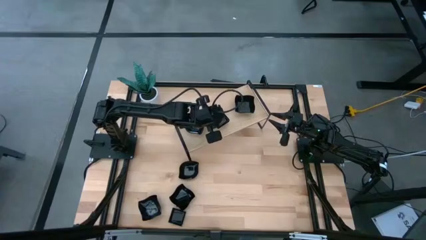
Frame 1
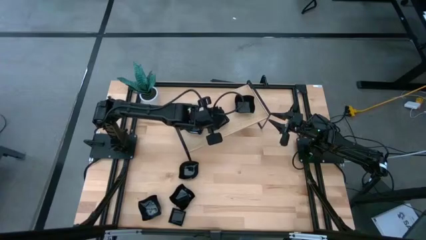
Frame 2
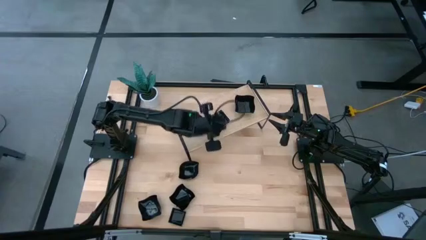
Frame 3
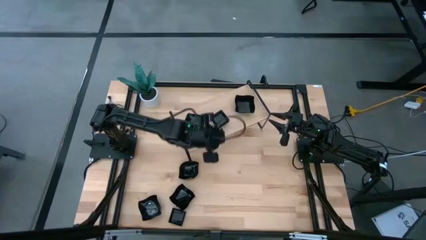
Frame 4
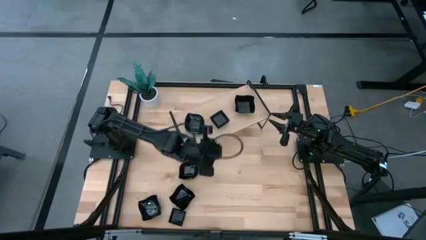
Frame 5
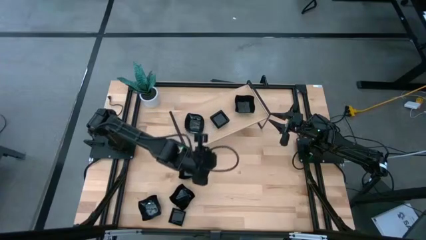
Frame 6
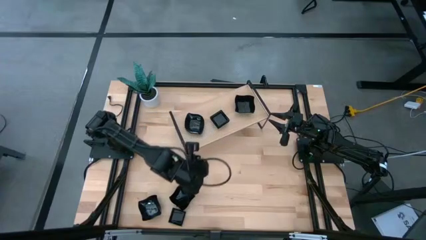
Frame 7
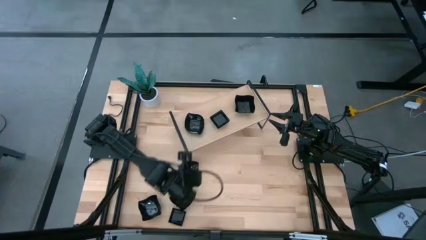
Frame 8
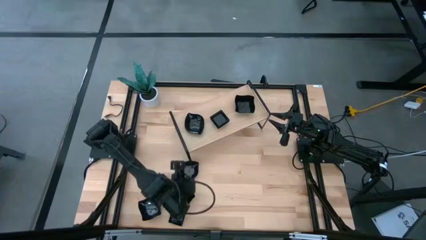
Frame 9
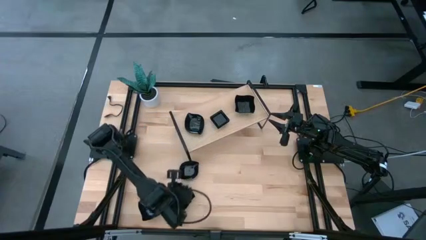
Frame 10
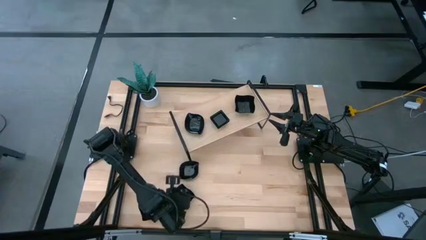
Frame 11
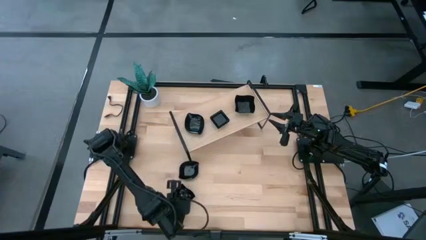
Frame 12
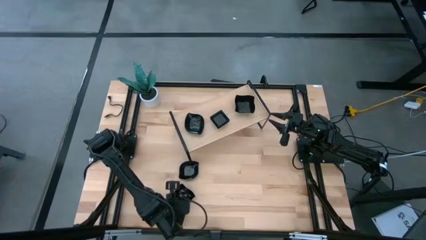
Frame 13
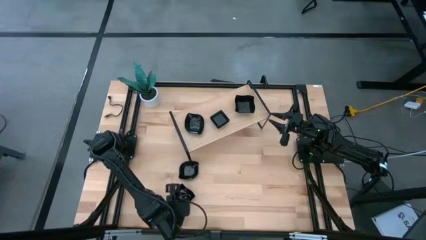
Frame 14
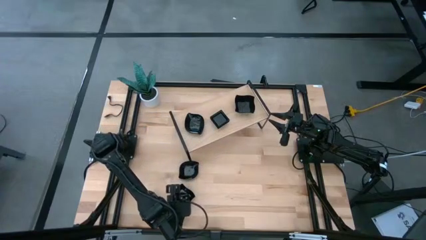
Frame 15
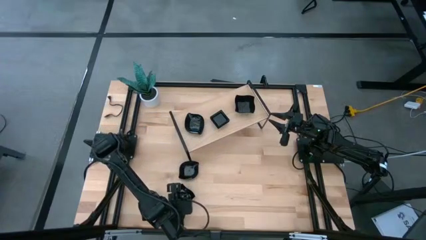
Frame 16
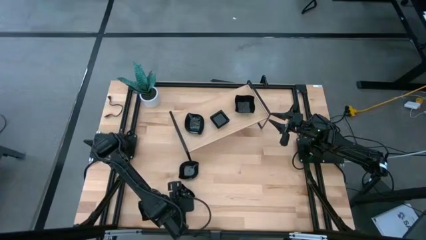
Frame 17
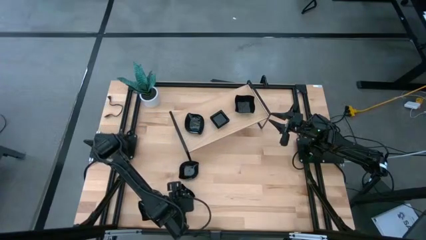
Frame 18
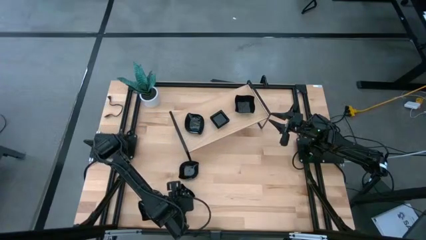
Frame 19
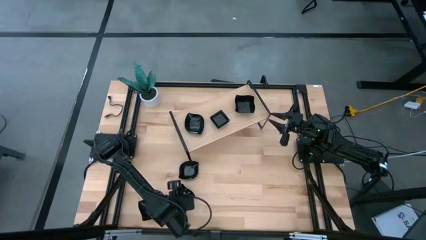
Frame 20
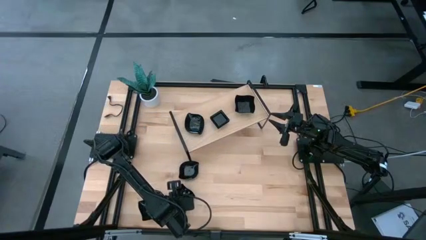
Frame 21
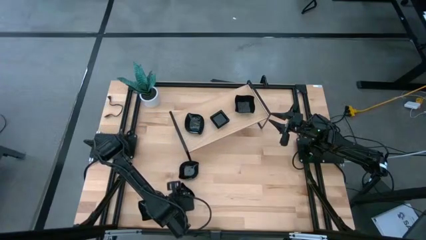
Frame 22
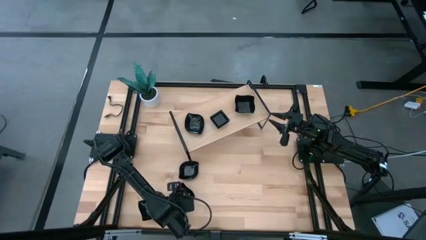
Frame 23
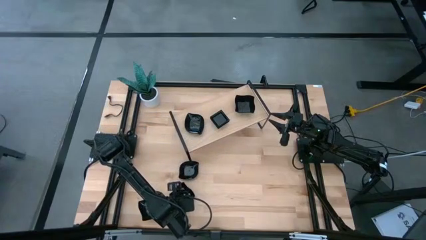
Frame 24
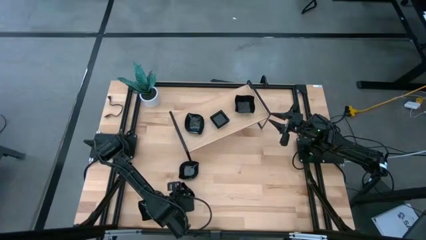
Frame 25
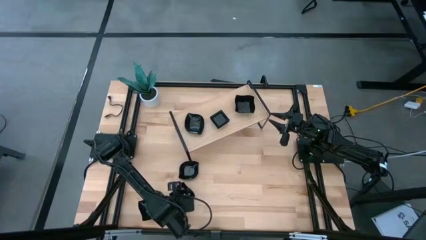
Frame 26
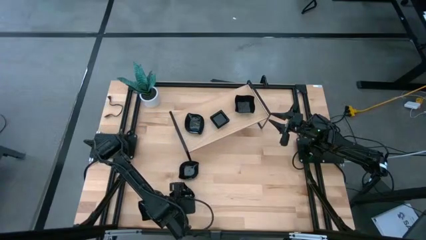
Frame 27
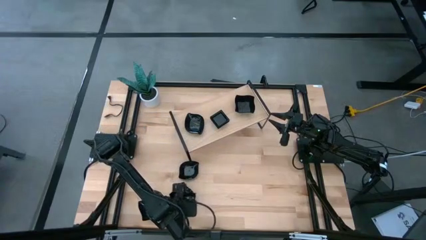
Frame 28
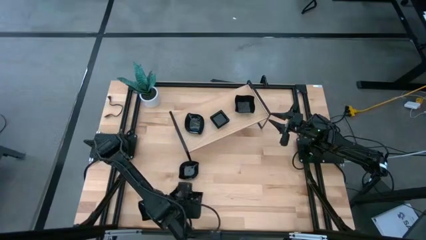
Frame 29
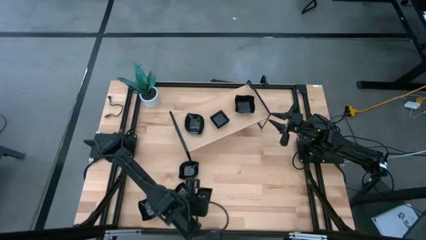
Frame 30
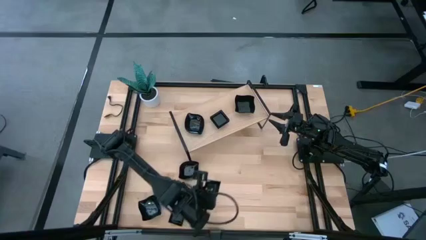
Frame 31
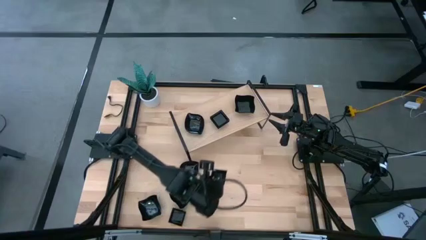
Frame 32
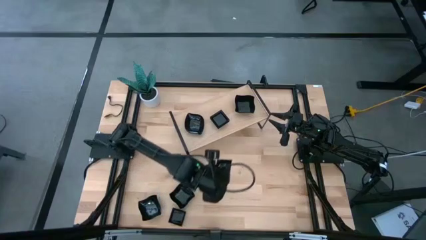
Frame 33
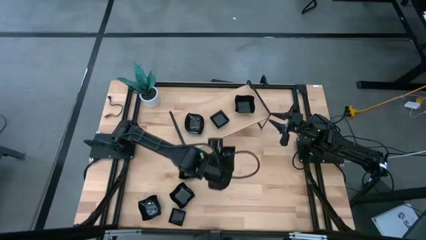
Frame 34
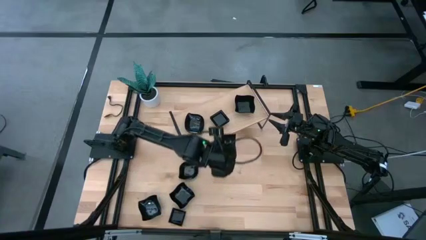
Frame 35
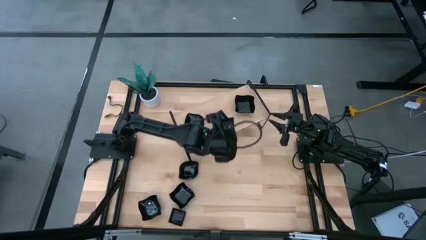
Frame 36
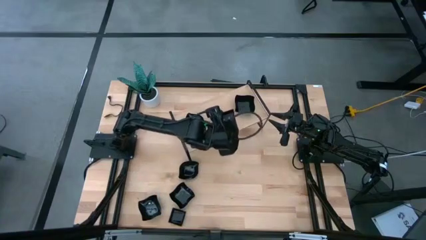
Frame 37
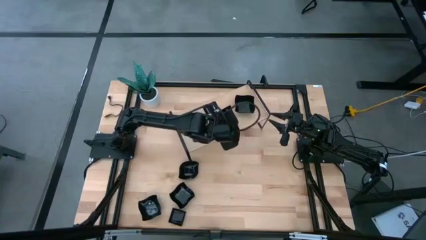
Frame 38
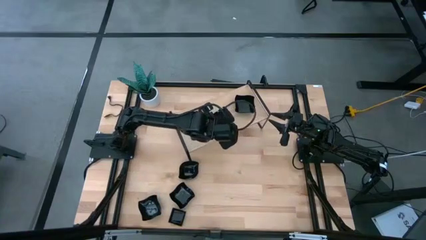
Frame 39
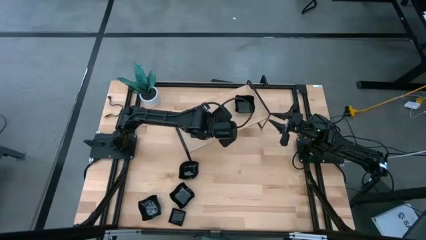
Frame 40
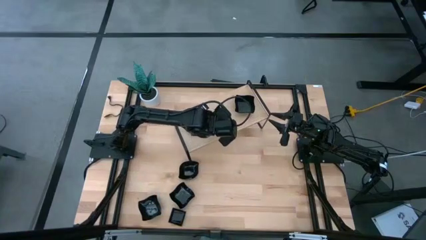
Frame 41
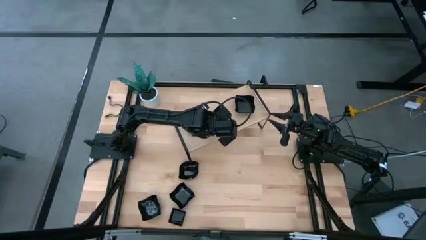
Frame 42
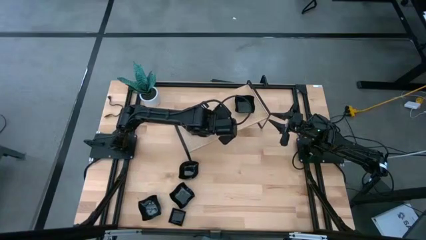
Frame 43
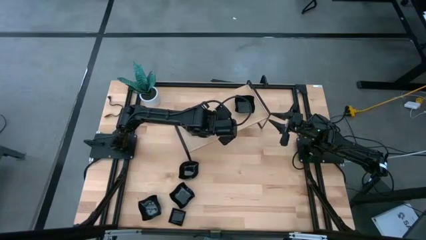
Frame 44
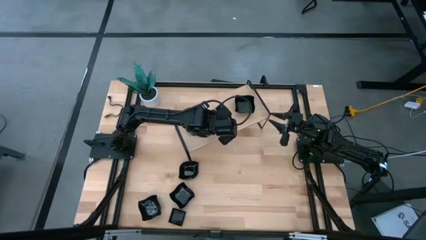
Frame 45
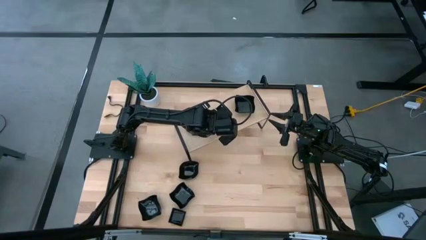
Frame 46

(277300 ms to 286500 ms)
Task: Pick & Place Mini shaped plates
Stack the black square plate on top of the black square plate on the shelf

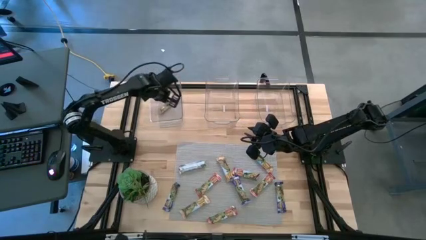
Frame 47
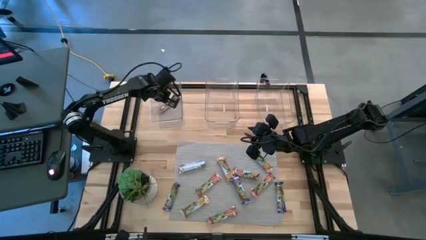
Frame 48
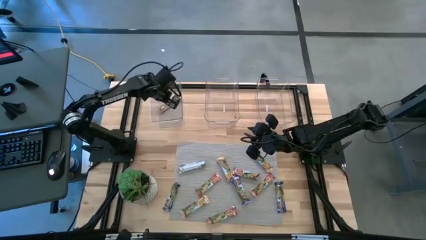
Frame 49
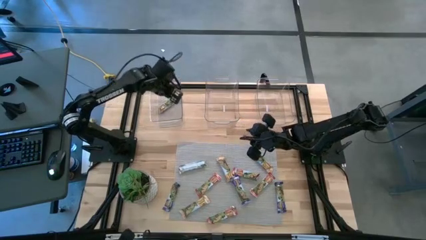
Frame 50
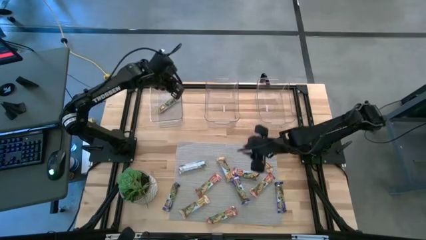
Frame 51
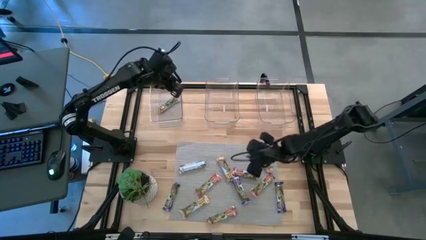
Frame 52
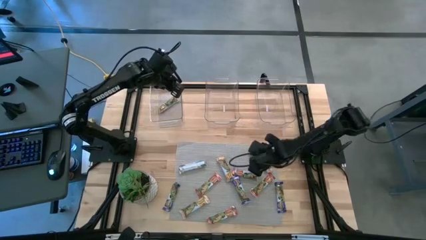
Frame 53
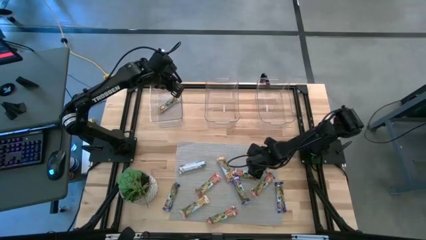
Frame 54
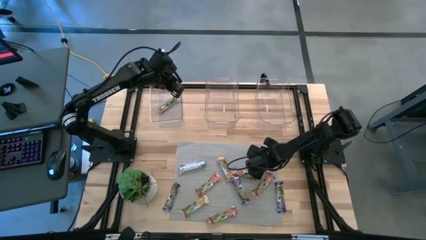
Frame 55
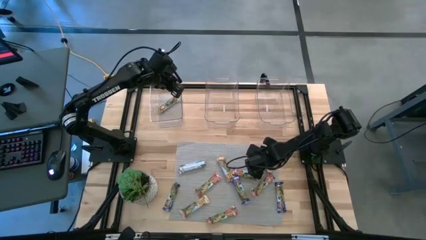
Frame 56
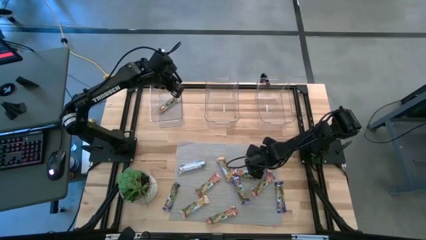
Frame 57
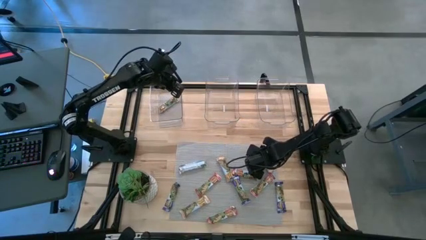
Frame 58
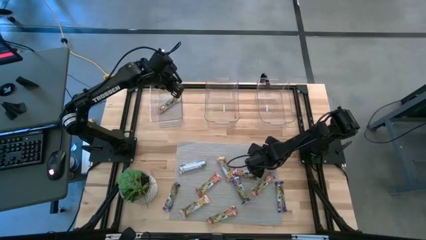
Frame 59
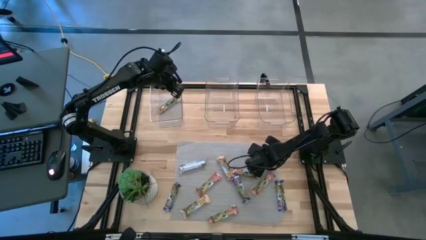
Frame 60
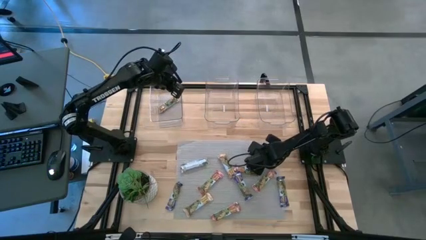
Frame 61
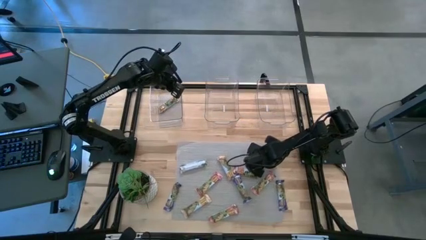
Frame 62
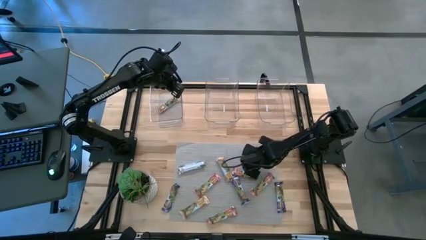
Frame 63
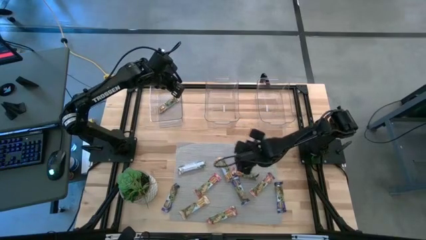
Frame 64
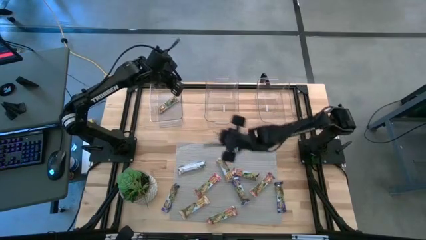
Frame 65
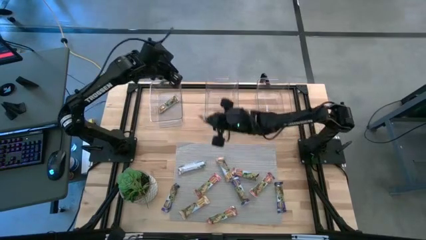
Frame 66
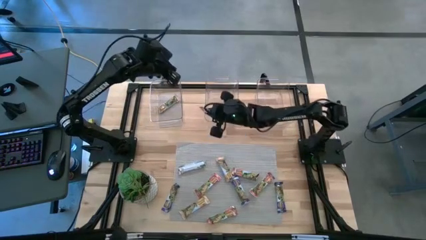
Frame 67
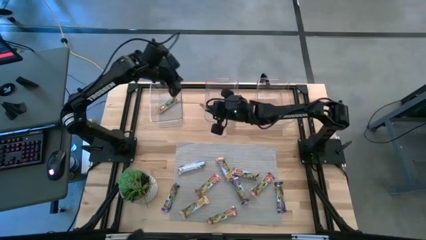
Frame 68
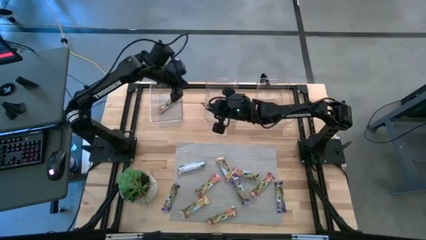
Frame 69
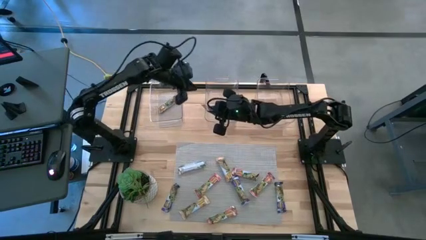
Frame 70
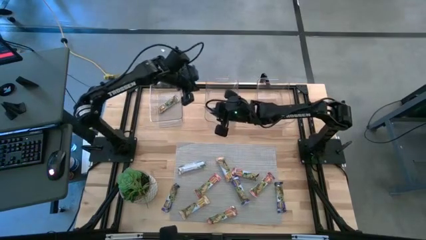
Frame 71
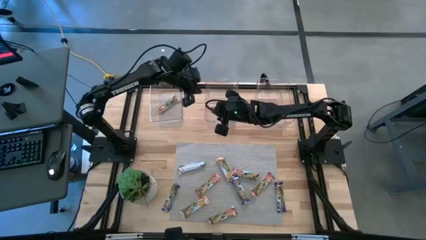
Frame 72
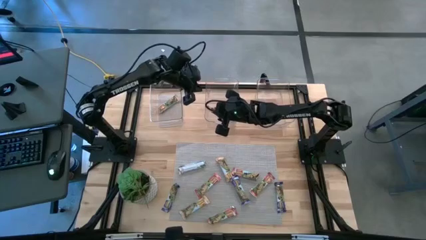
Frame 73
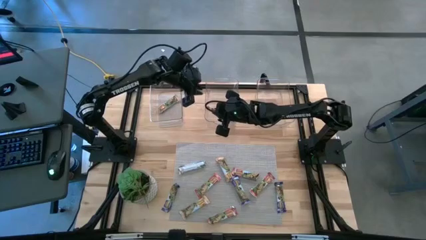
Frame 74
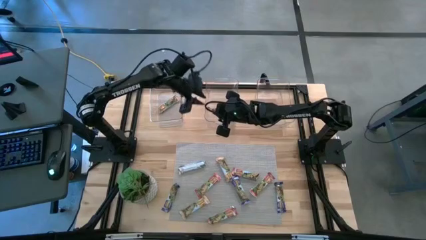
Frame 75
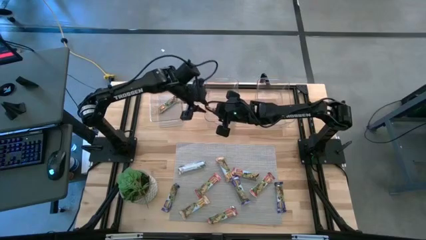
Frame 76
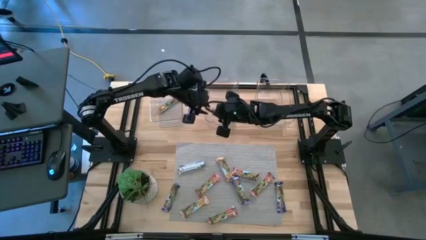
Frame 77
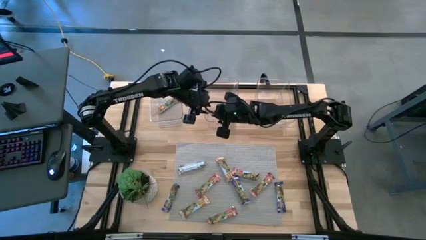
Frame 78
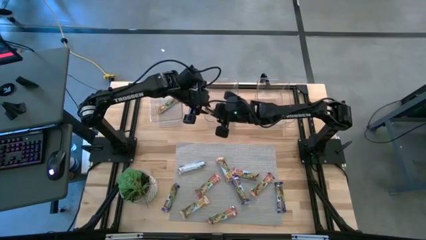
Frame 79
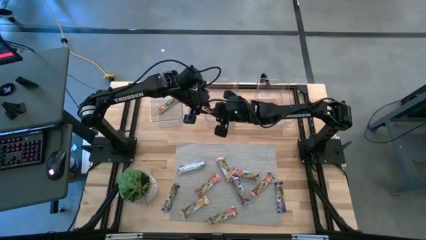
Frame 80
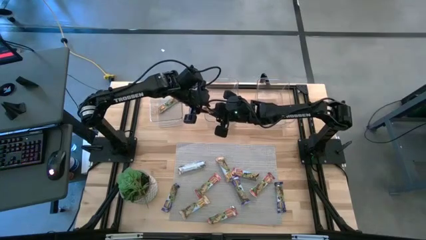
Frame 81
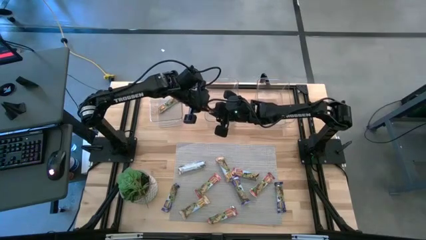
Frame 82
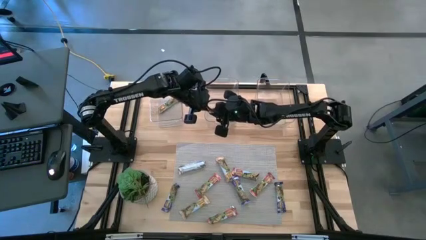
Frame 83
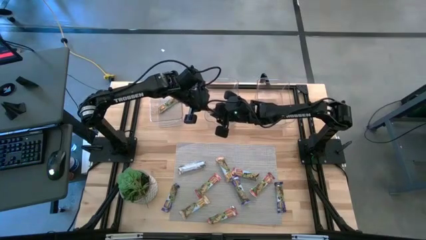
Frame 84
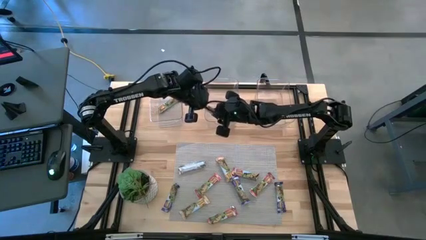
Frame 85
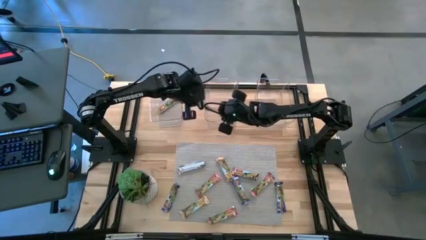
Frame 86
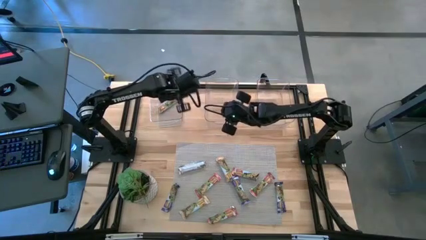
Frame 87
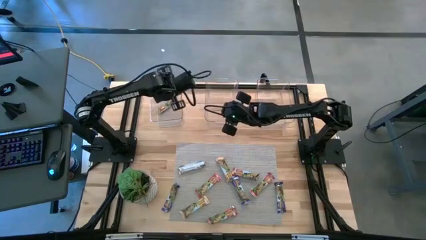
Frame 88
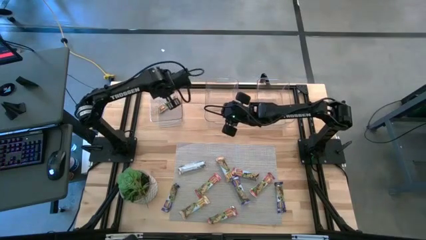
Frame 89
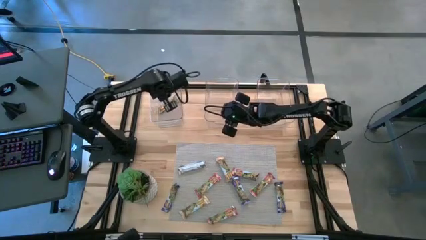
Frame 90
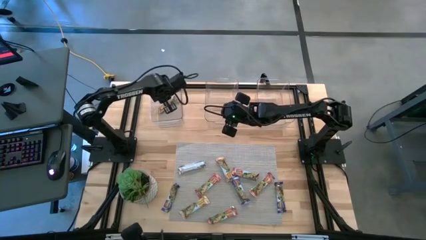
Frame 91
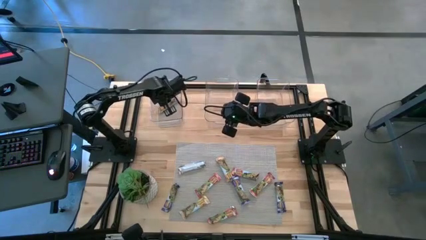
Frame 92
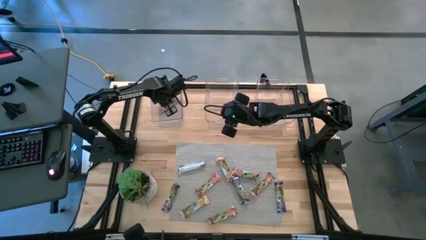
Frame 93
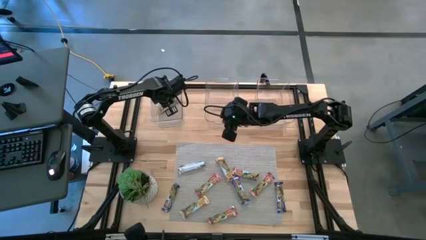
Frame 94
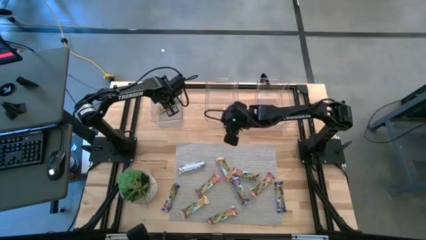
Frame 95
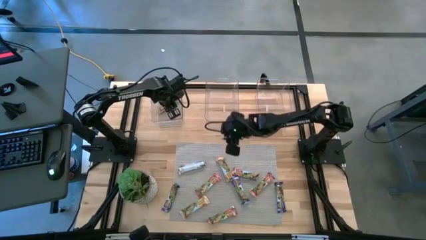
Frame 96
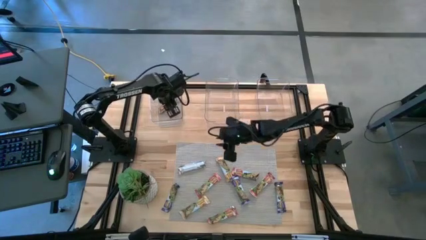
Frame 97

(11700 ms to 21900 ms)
Task: Pick and place Granola Bars by type
Put the top right yellow granola bar into the left transparent bin
